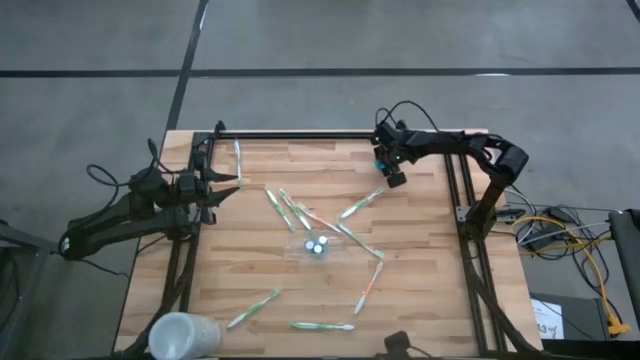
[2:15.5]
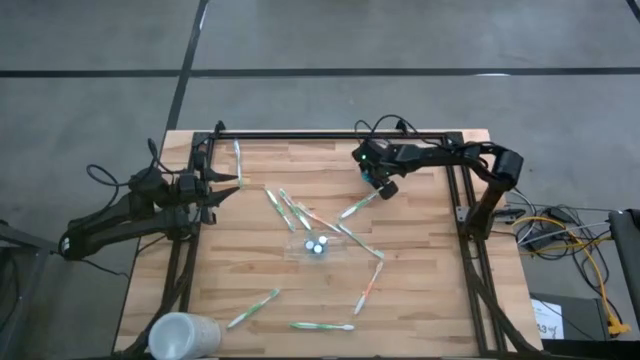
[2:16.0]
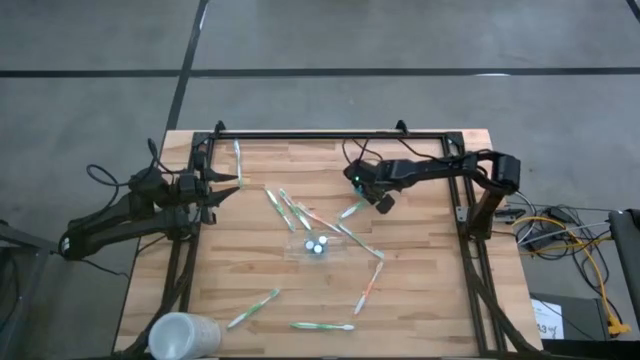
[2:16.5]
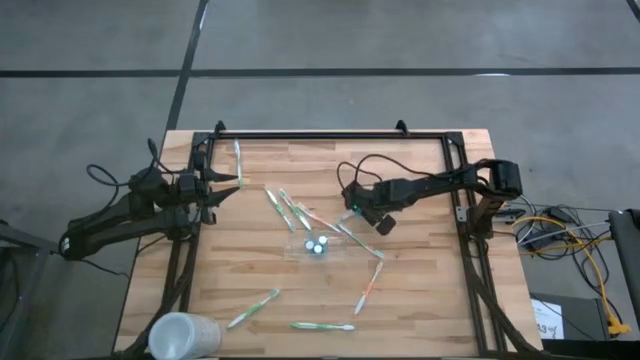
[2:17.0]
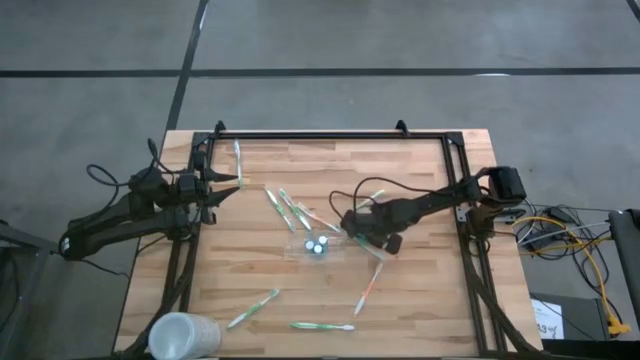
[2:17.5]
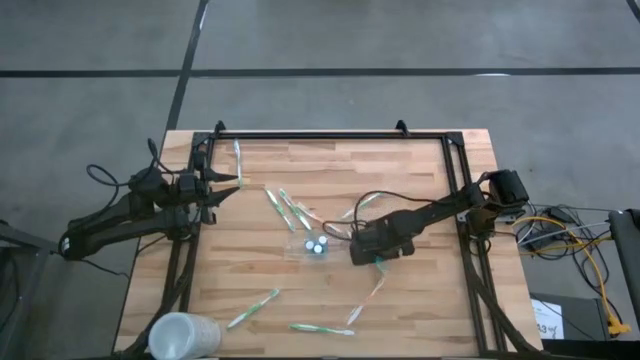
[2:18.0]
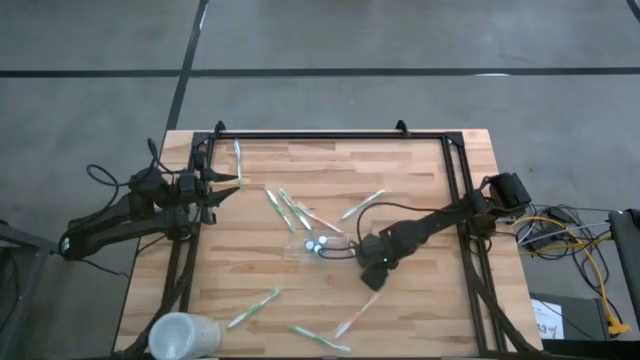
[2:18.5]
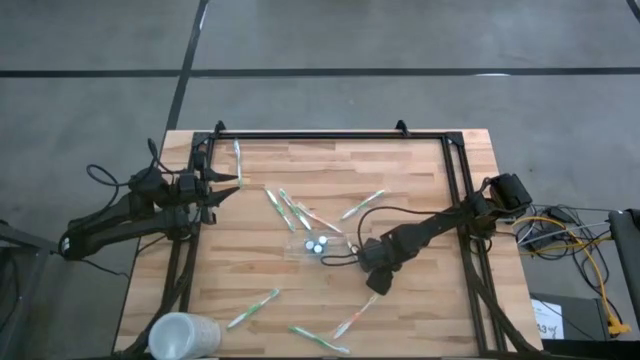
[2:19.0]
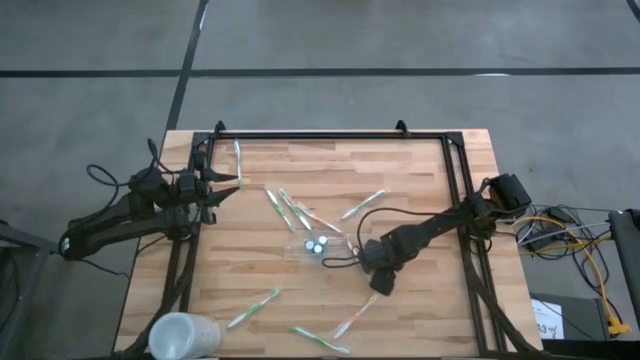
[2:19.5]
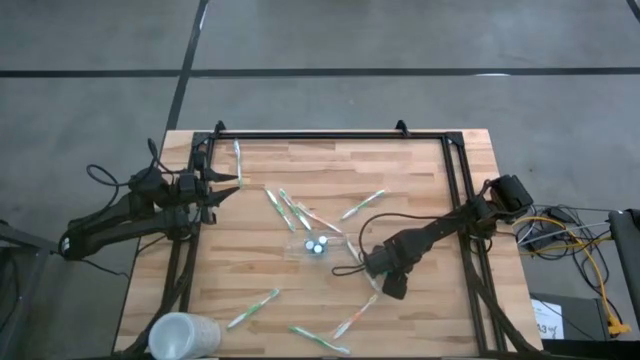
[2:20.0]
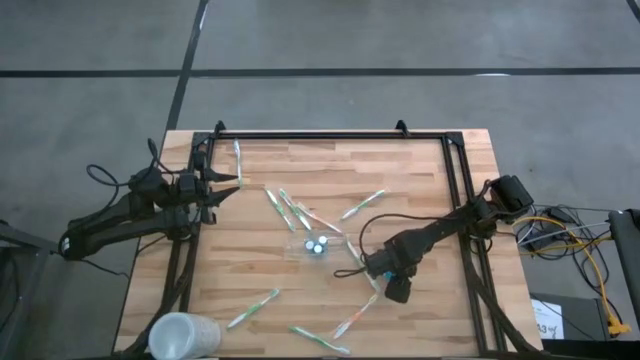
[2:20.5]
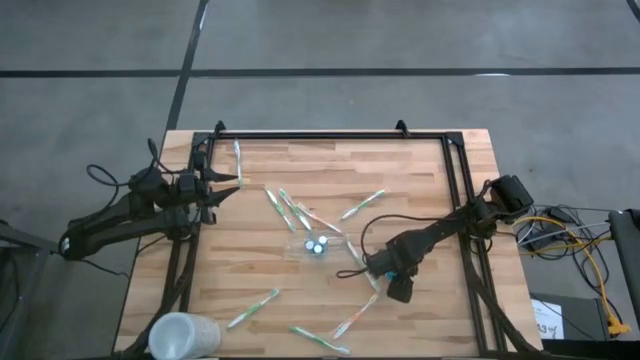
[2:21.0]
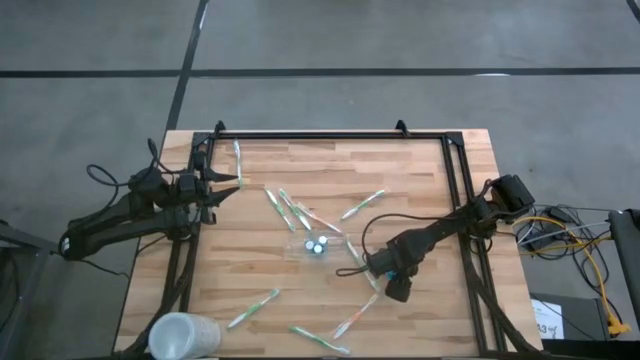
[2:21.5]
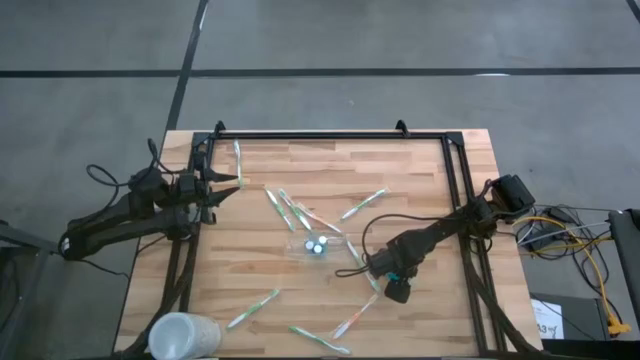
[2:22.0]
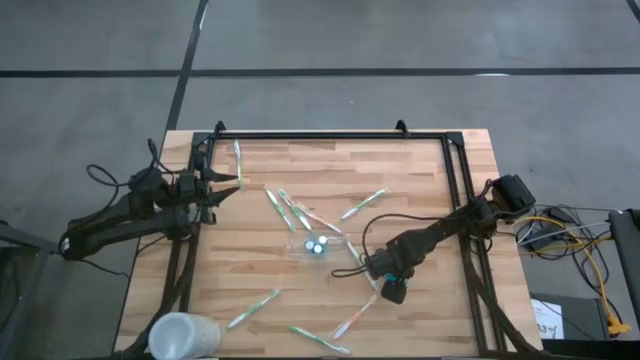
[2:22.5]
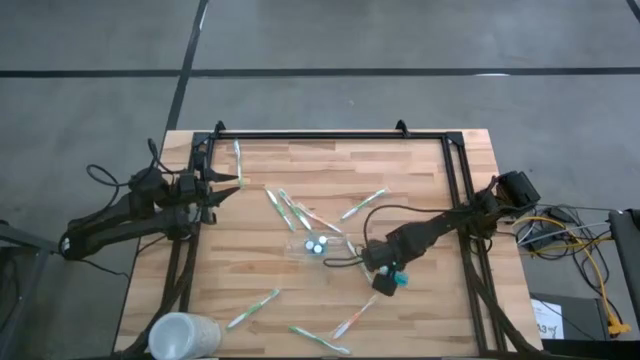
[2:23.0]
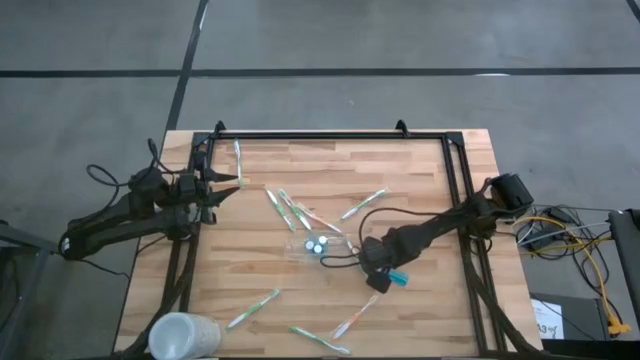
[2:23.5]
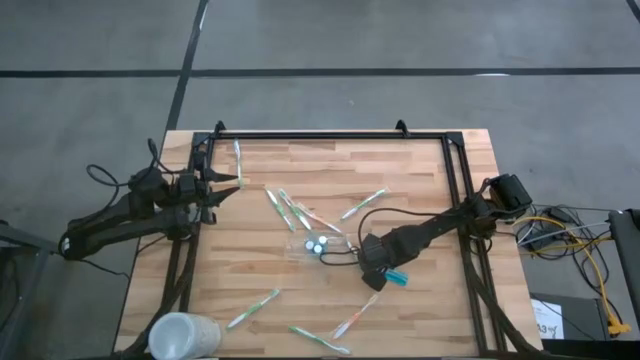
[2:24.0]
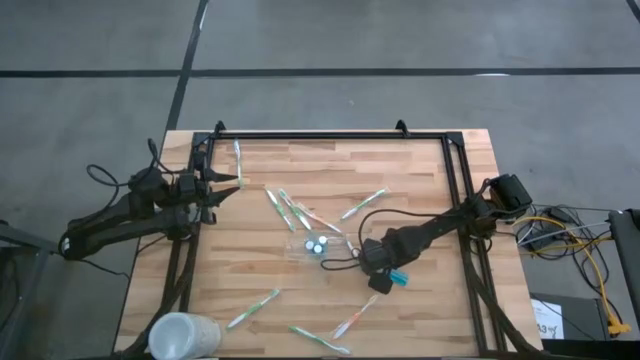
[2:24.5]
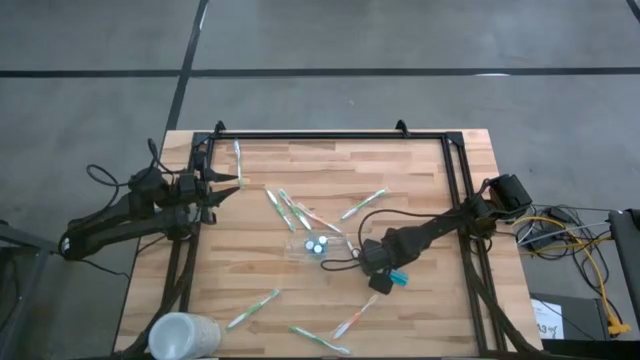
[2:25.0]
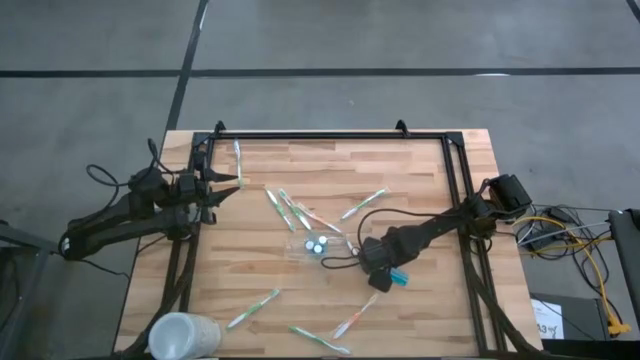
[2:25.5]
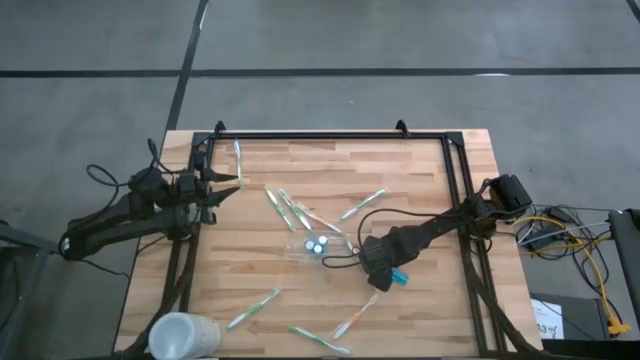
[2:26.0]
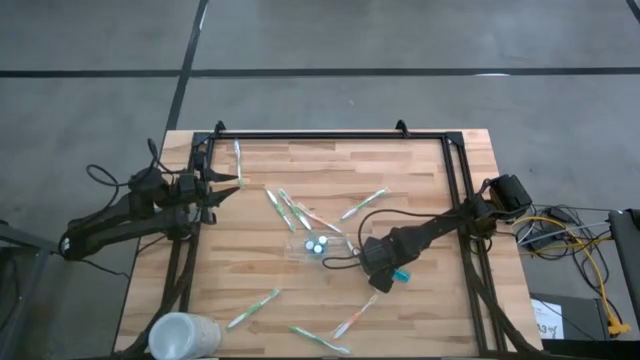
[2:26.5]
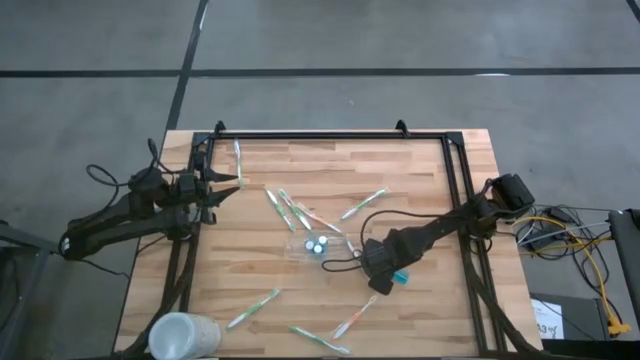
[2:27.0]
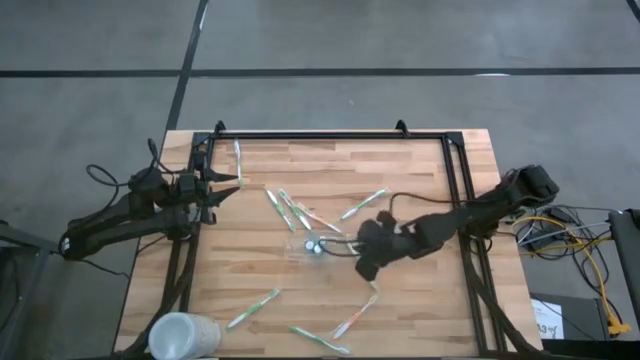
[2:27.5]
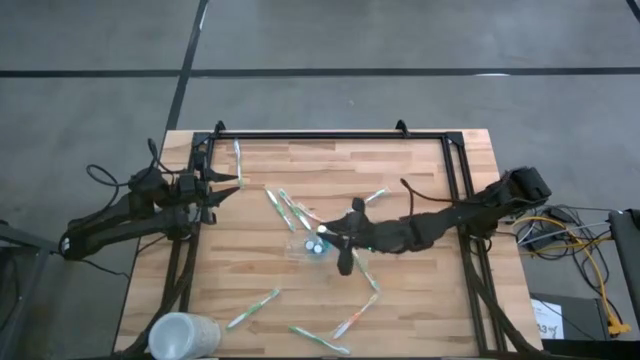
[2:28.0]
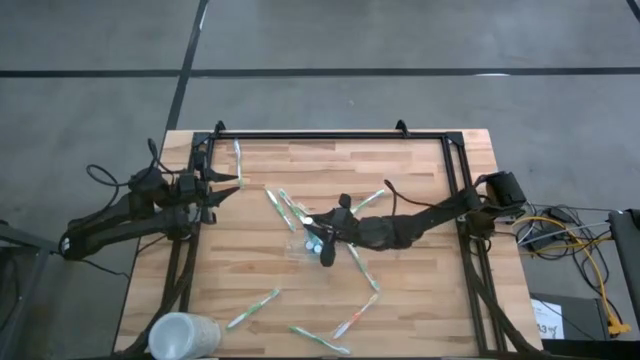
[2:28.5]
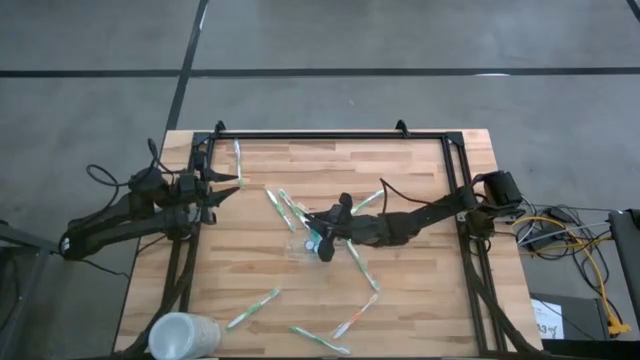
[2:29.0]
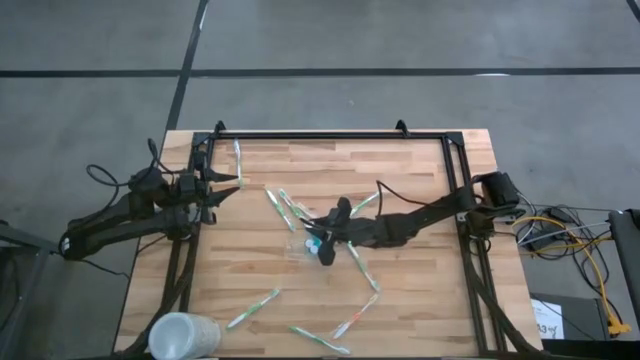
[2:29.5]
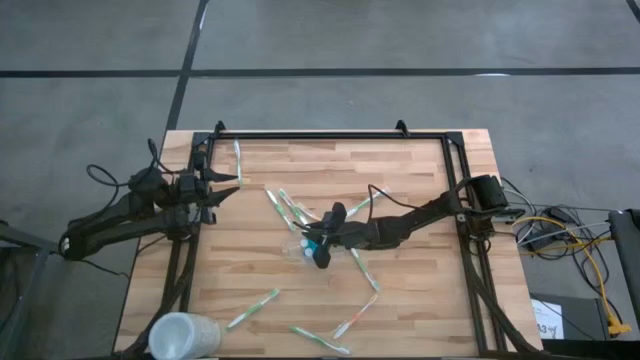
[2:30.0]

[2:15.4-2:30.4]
Task: Pick & Place toothbrushing station
Put the blue mouthwash bottle into the transparent organizer

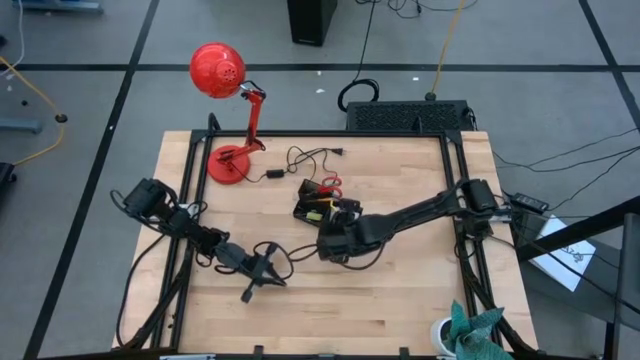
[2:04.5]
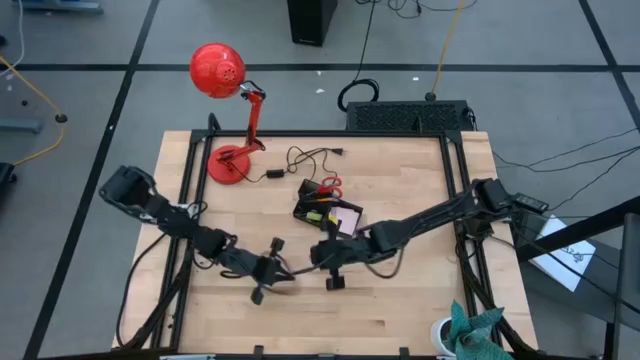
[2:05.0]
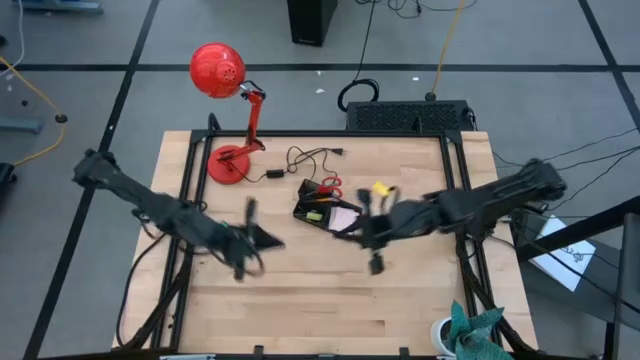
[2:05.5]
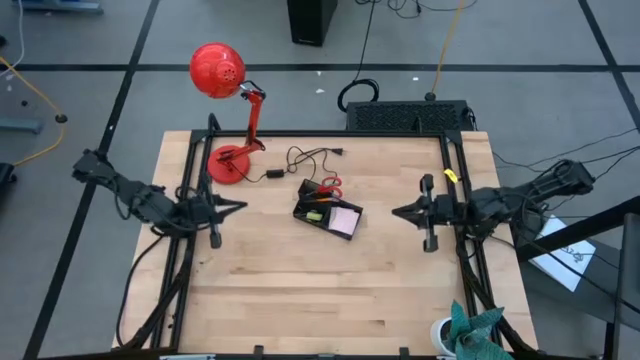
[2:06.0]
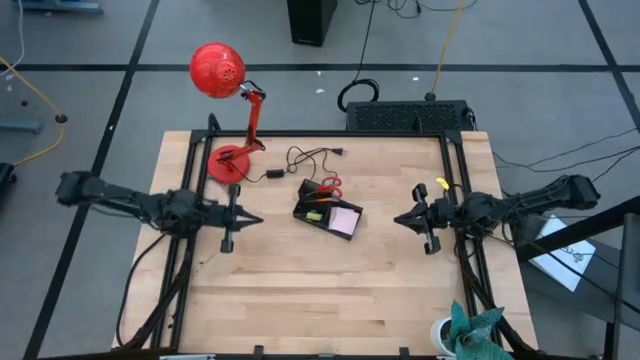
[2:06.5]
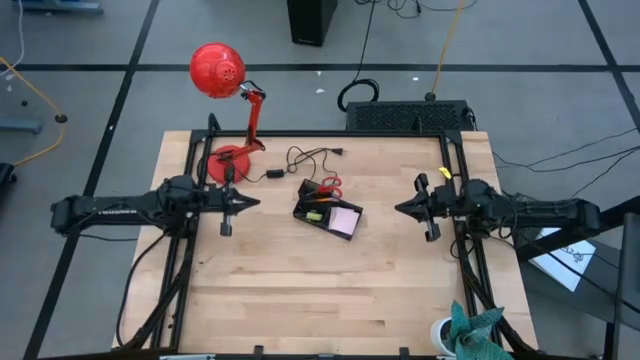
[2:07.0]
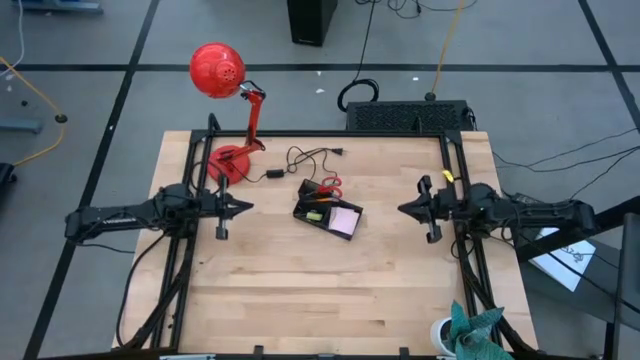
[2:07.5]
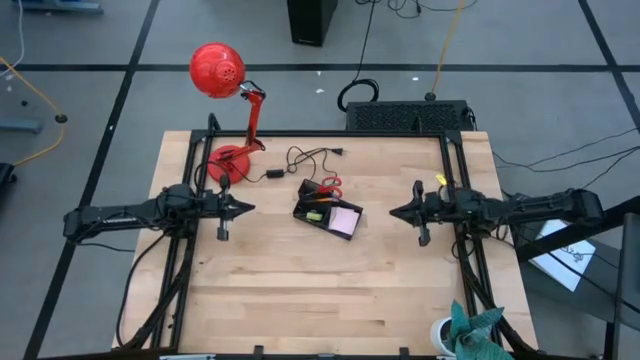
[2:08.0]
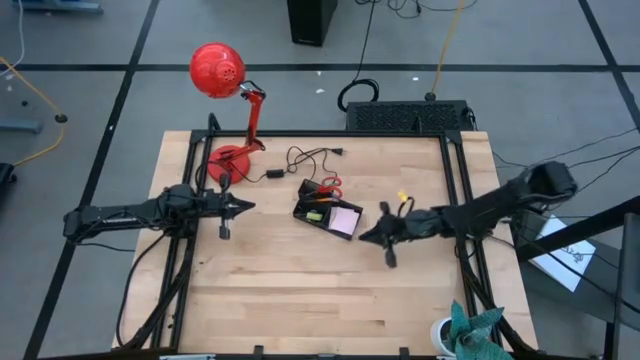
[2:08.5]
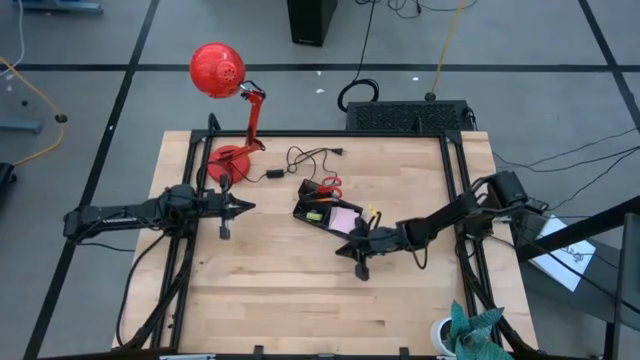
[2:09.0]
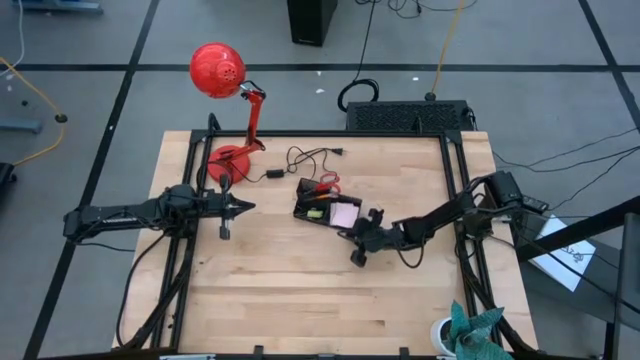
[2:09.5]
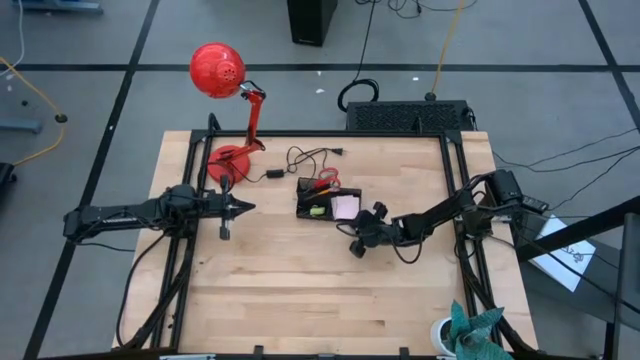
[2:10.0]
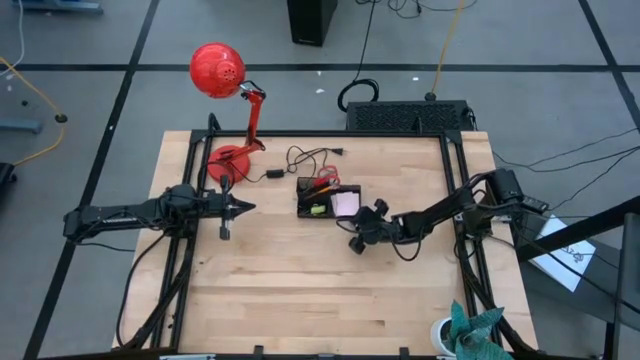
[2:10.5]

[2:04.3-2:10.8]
Task: Pick and place office supplies into organizer
Adjust the black desk organizer

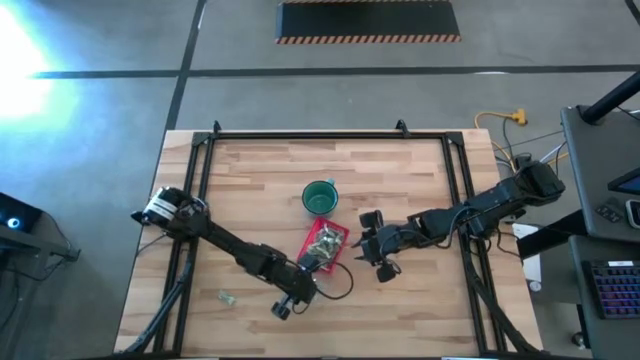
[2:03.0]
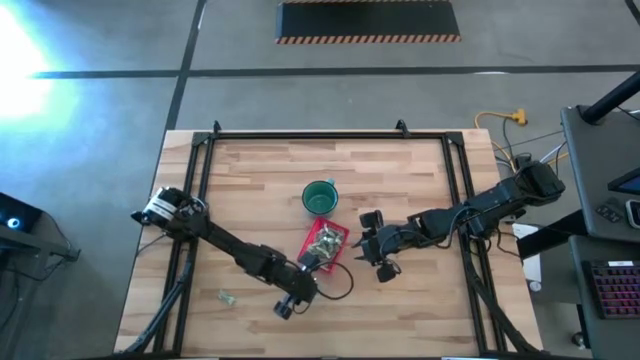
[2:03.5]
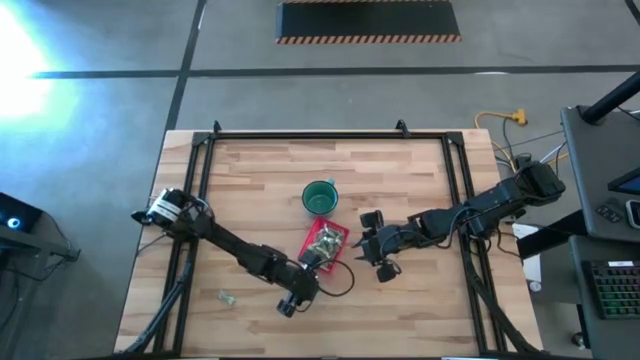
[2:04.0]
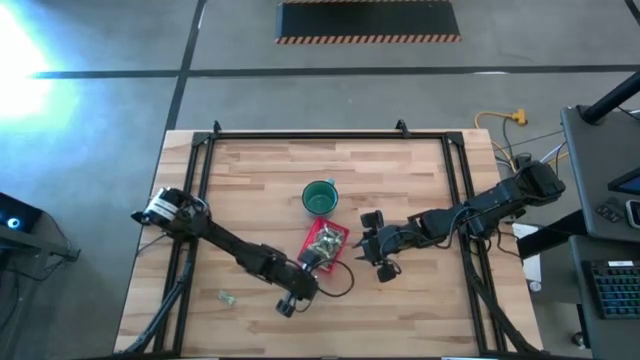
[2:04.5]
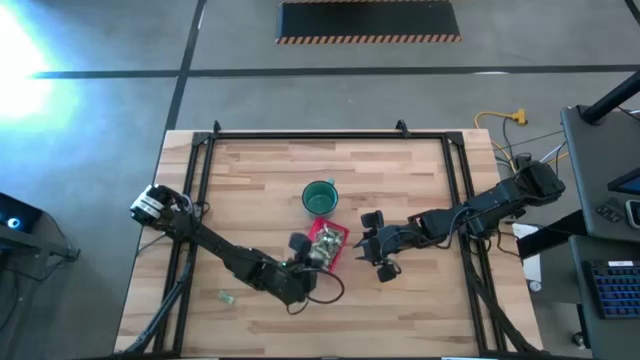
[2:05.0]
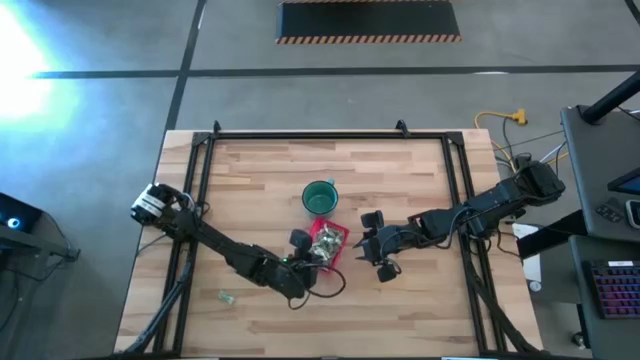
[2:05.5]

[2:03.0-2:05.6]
Task: Pick and place items into bin
Put the light green stevia packet into the red bin
